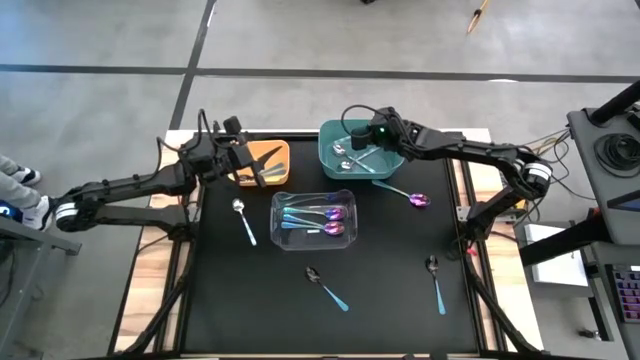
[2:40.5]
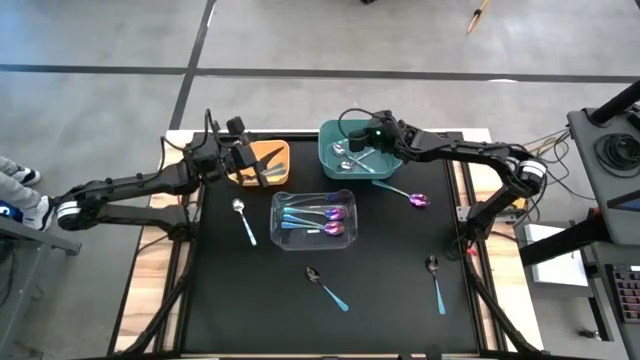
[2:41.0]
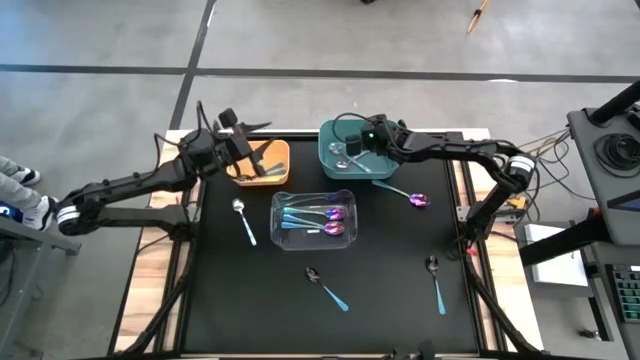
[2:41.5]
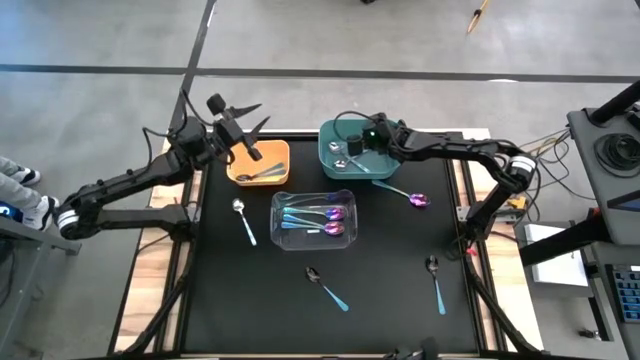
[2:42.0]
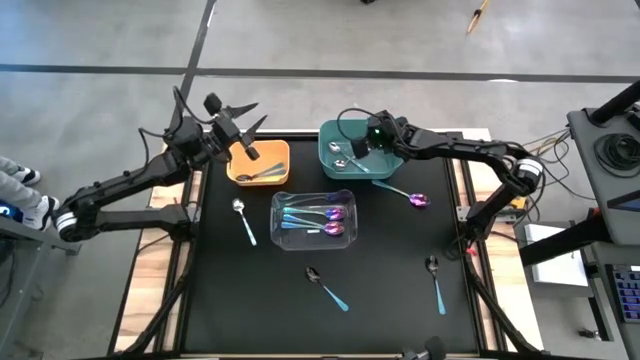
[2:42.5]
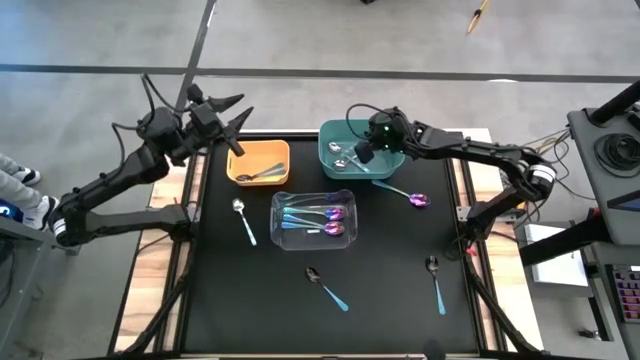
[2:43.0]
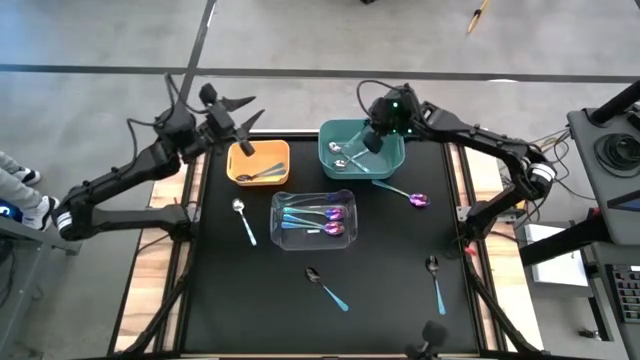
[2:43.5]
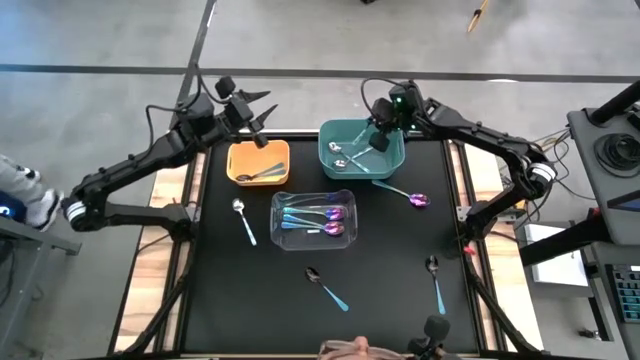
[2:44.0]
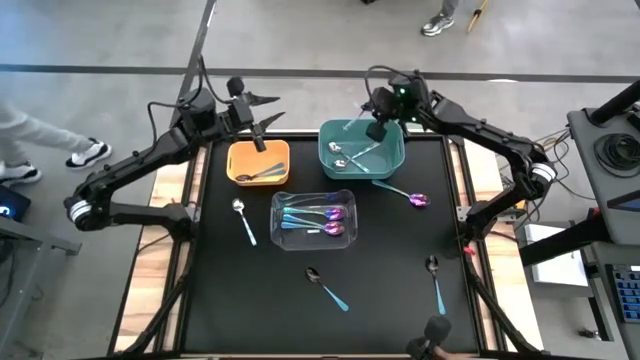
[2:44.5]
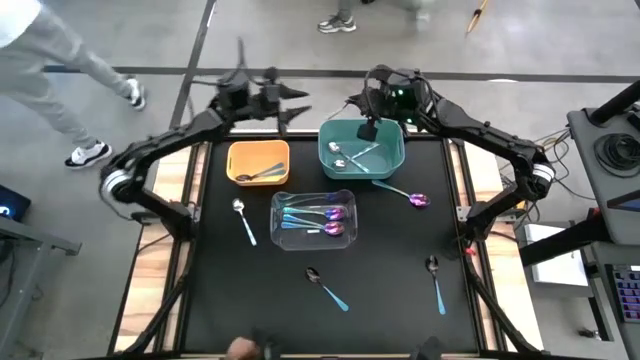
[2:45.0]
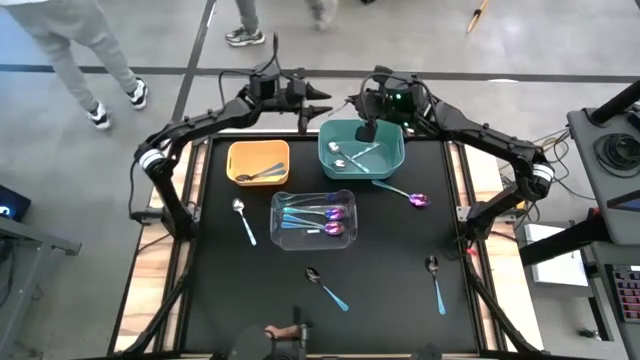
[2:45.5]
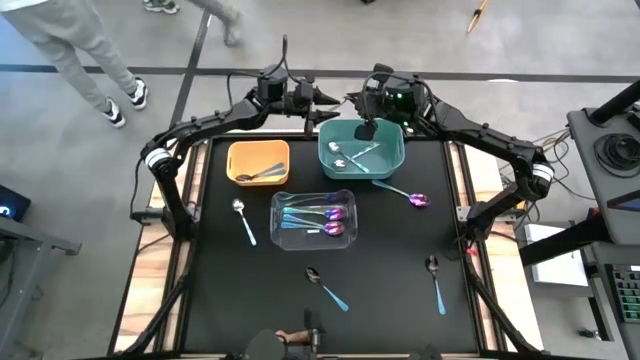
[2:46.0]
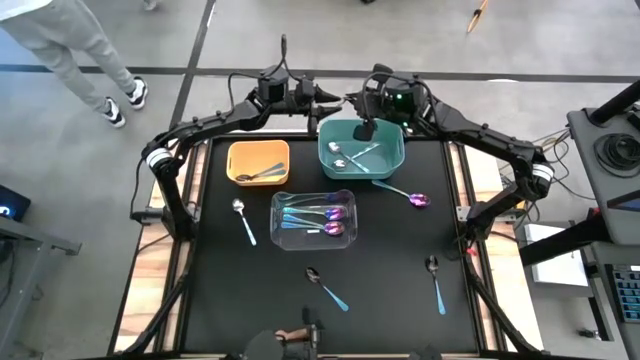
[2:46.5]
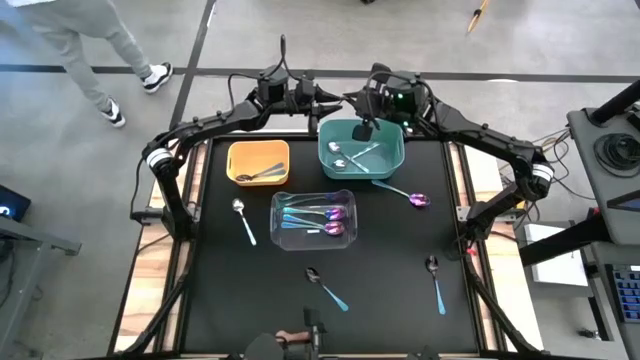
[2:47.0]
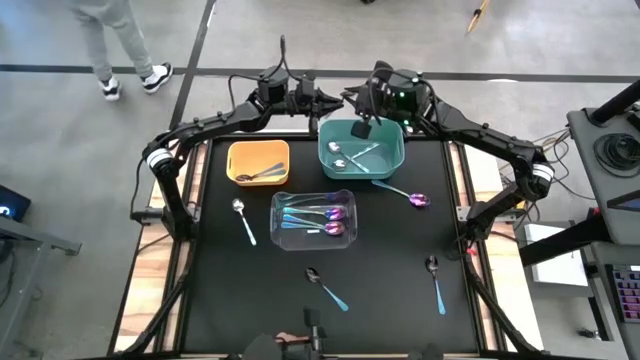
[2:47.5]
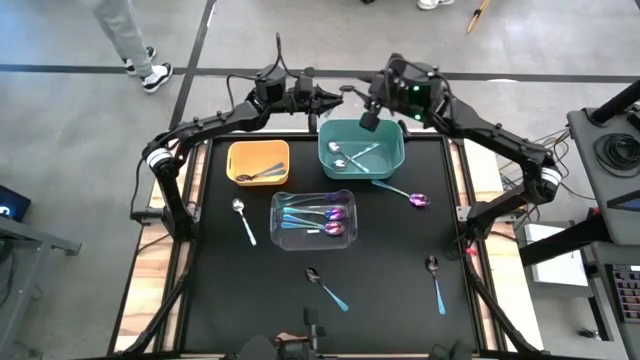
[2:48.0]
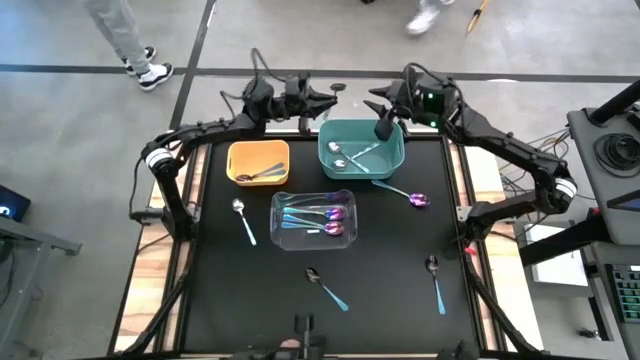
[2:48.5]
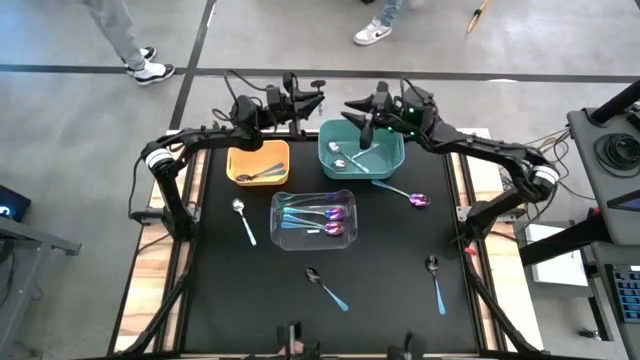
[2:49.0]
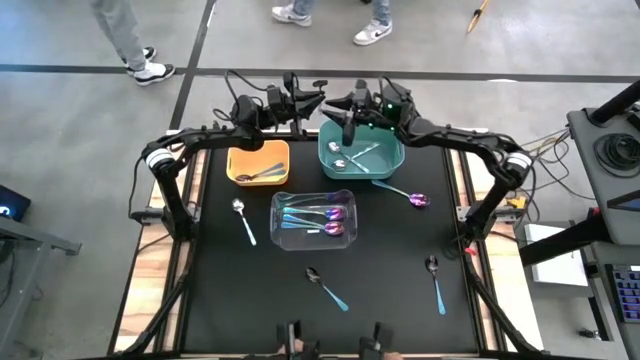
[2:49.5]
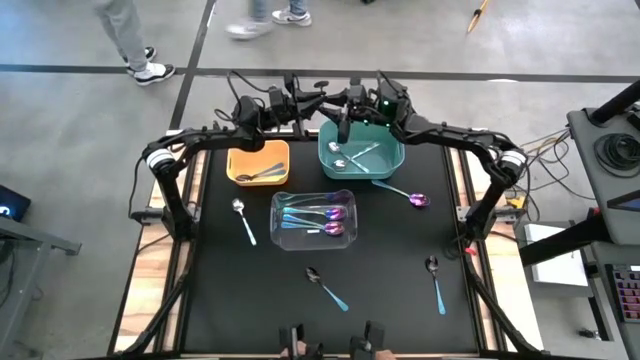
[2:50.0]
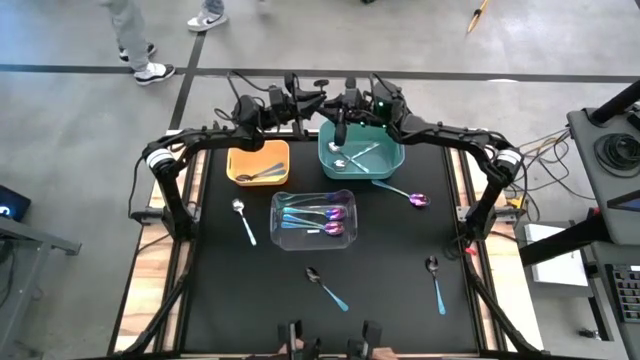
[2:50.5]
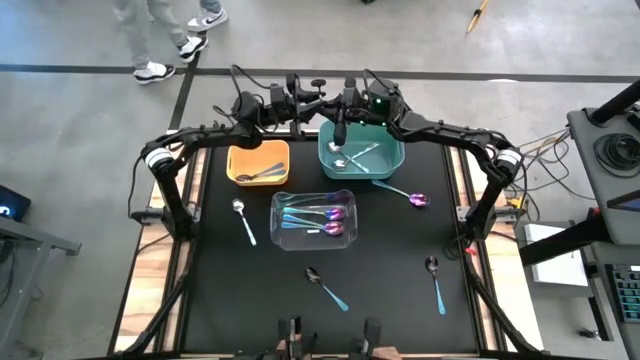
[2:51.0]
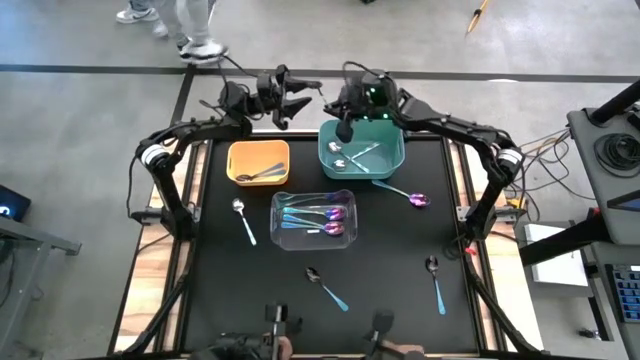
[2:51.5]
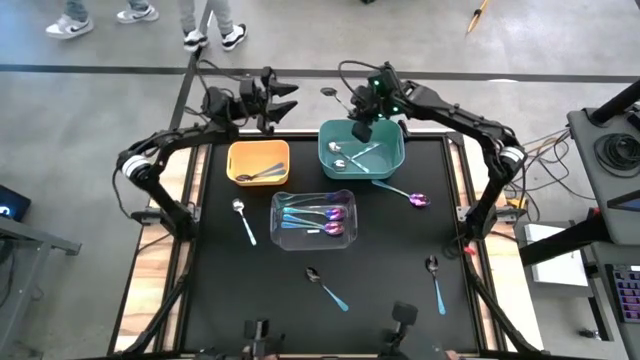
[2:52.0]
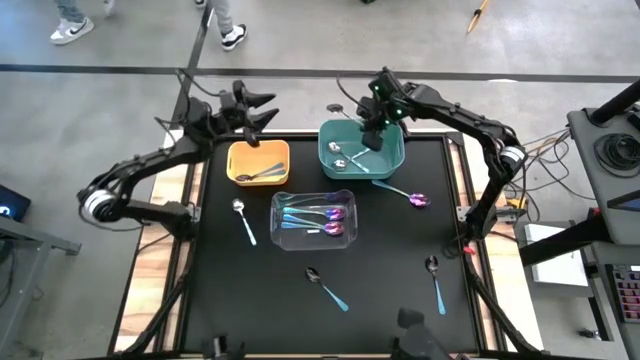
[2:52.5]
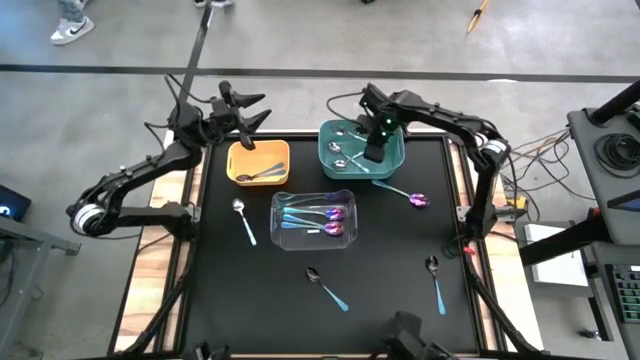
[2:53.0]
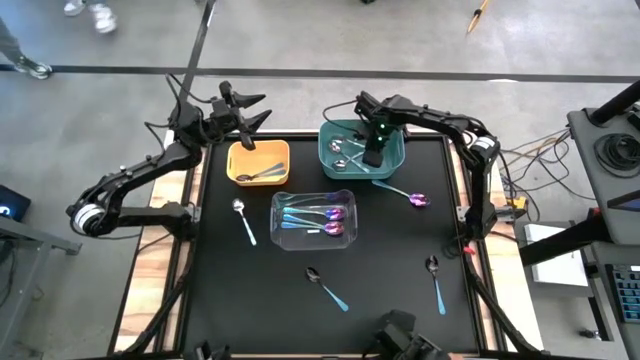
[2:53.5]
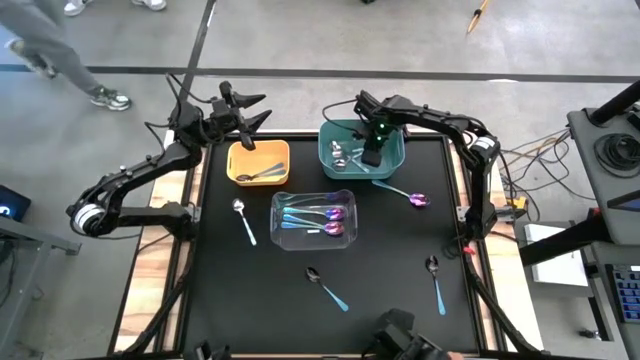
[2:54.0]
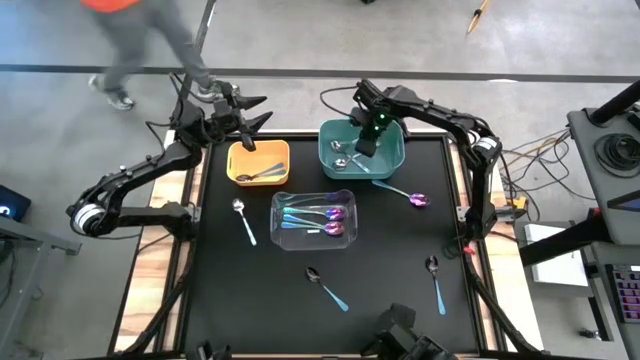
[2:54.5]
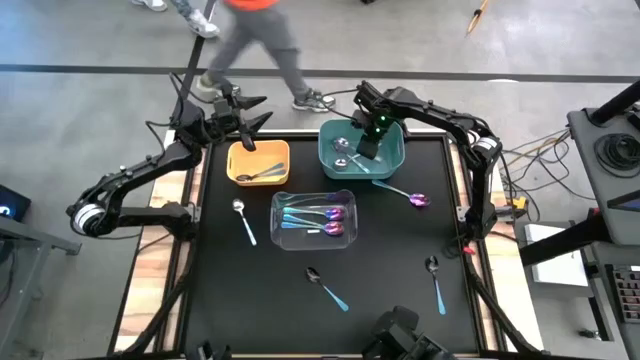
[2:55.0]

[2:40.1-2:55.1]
Task: Sort silverware by color (type)
Put the blue patterned spoon into the green bin

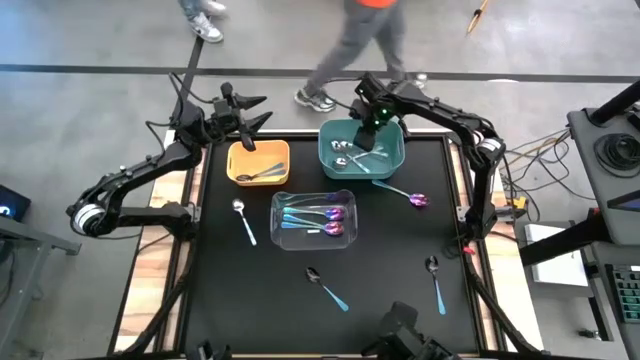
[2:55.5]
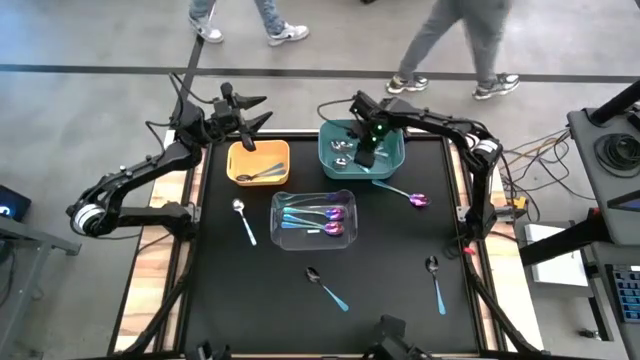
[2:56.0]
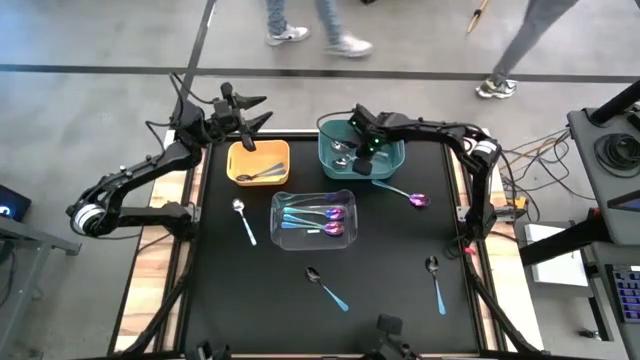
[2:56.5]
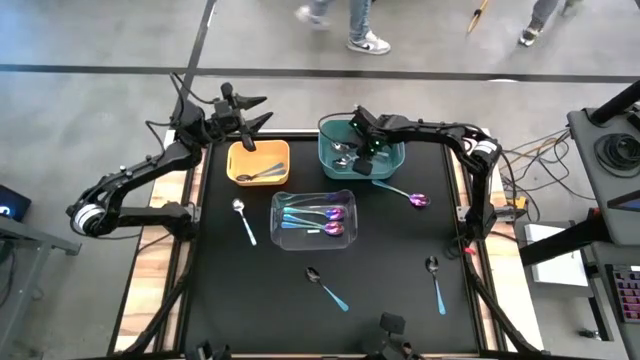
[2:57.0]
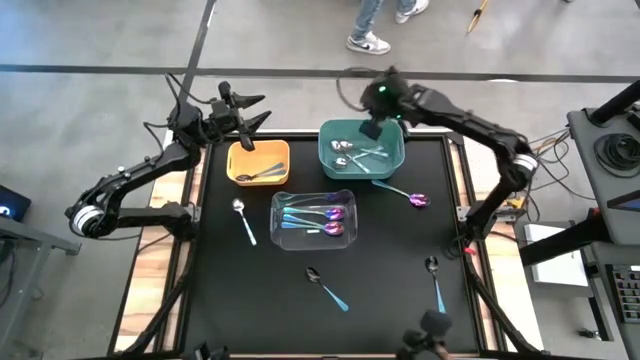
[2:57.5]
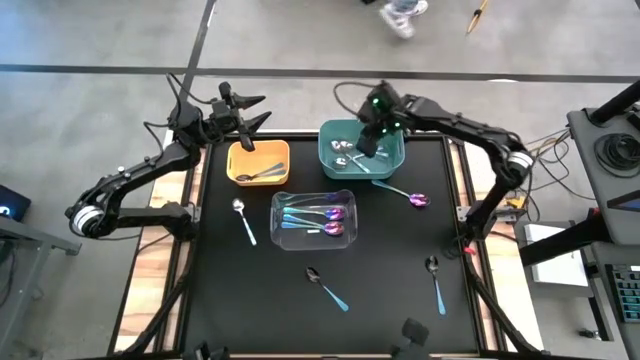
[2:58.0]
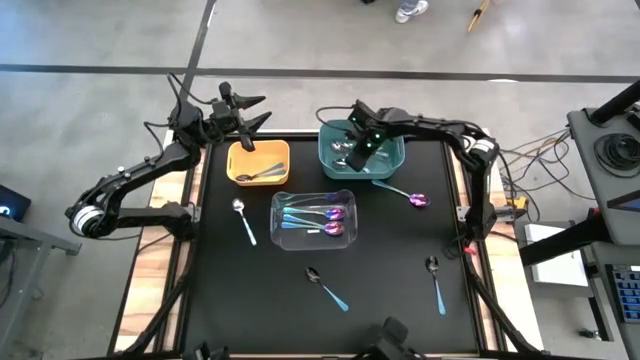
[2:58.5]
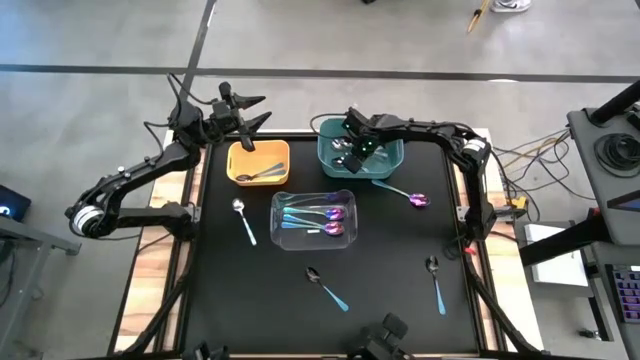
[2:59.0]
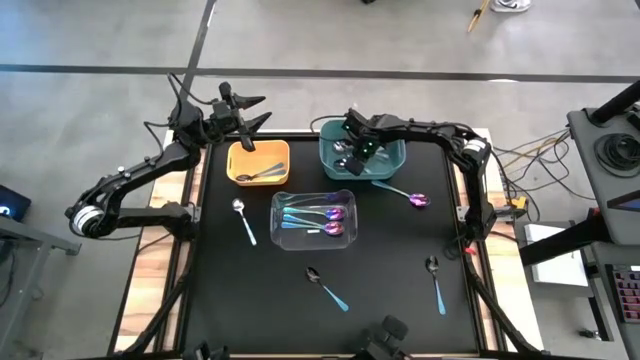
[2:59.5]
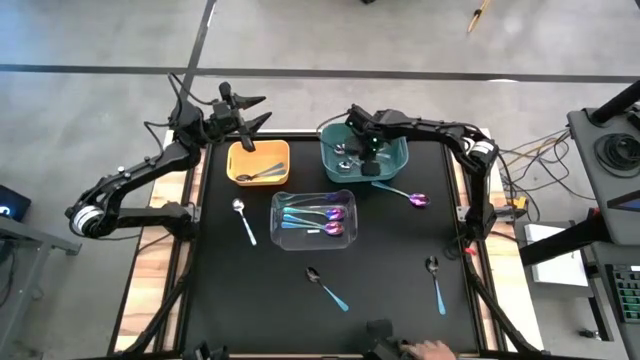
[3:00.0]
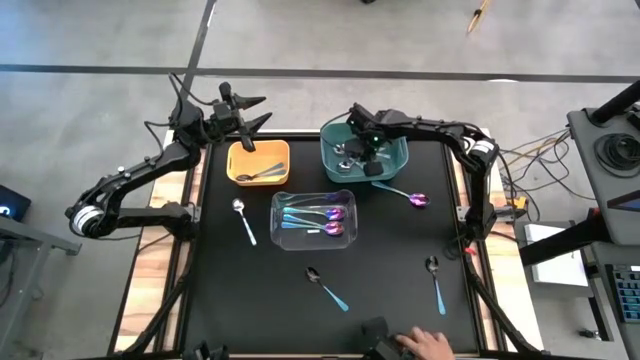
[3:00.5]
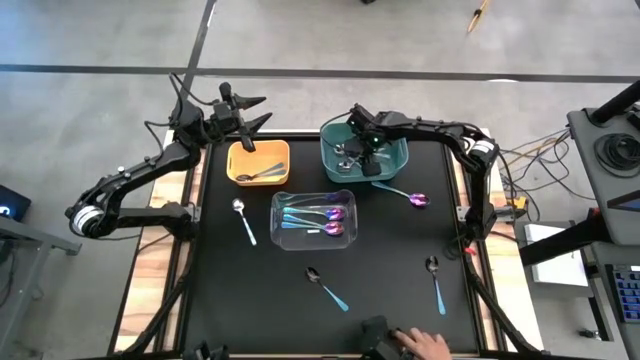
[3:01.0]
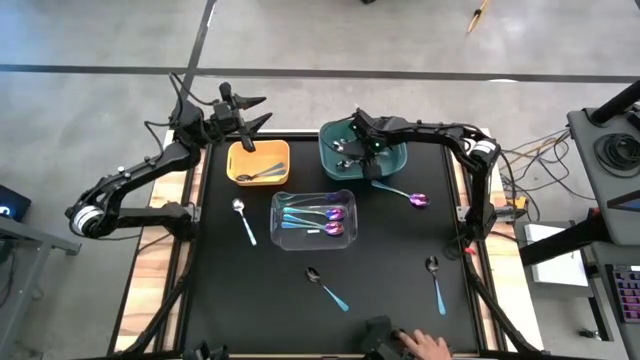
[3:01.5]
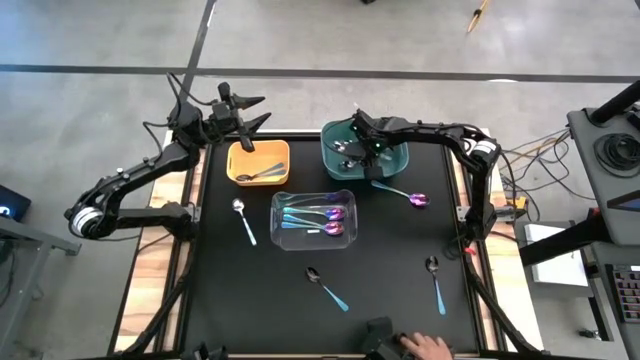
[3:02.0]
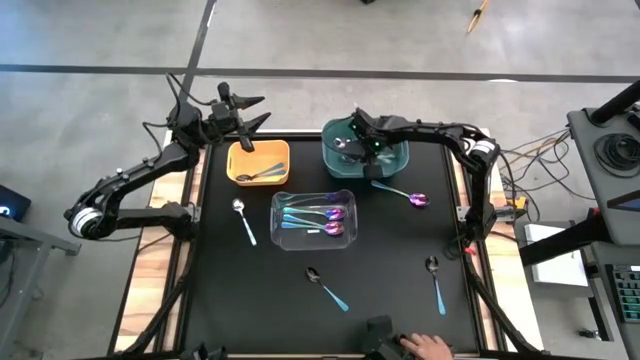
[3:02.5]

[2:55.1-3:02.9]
Adjust the blue patterned spoons in the green bin
